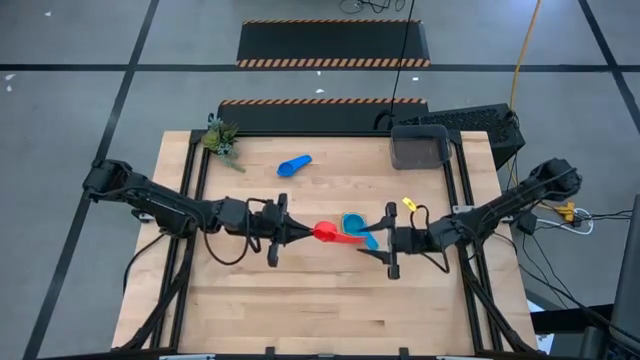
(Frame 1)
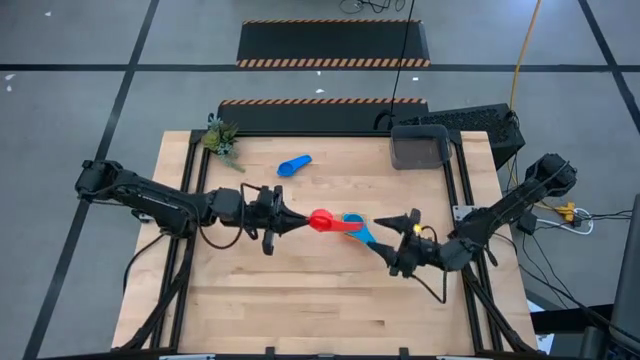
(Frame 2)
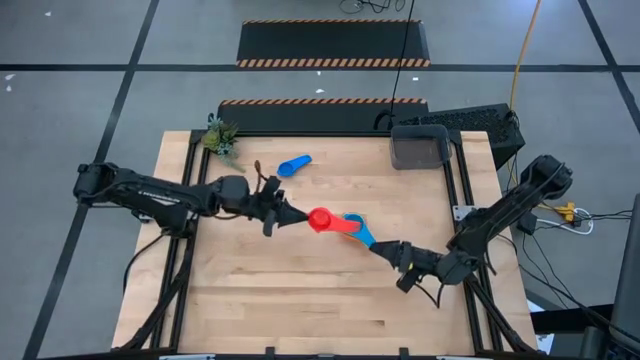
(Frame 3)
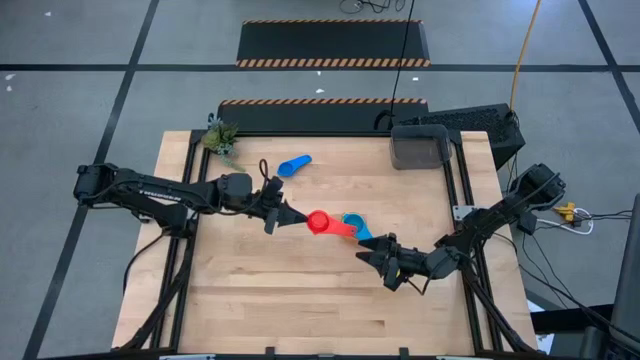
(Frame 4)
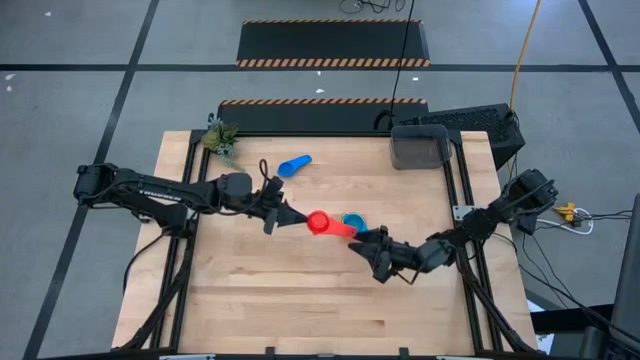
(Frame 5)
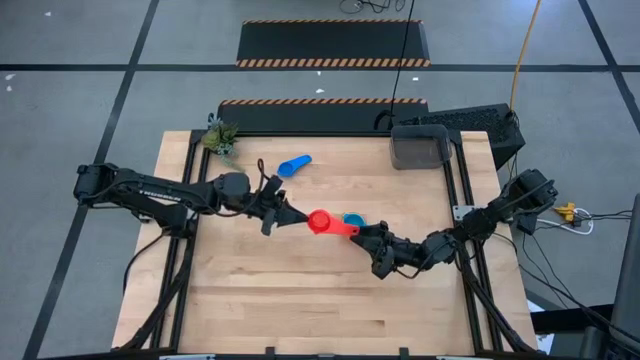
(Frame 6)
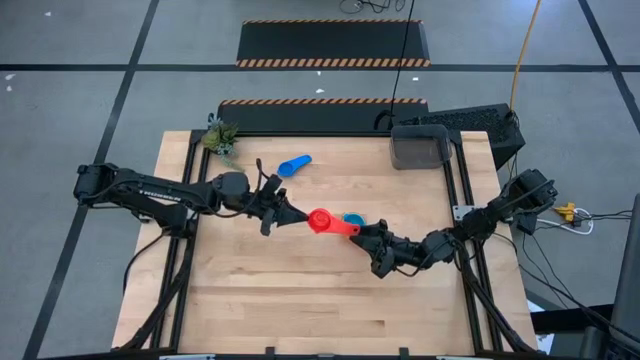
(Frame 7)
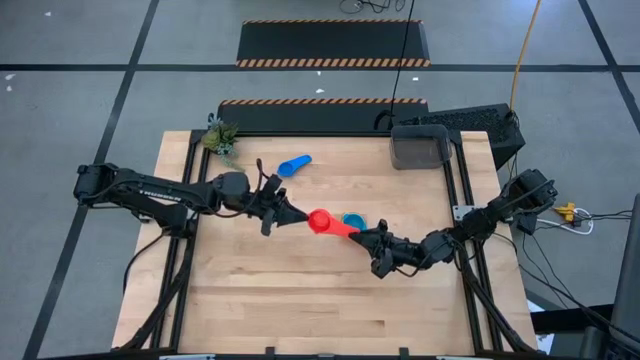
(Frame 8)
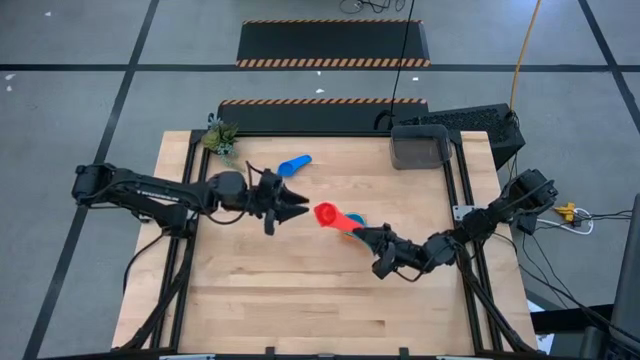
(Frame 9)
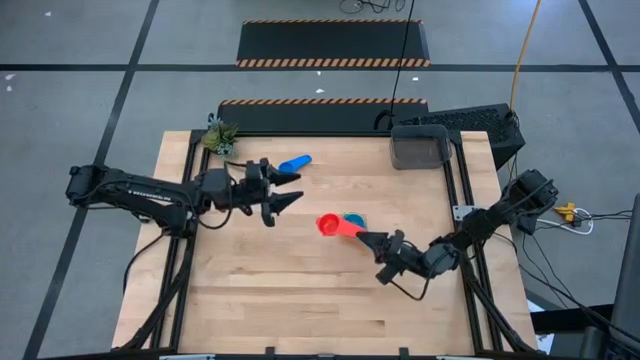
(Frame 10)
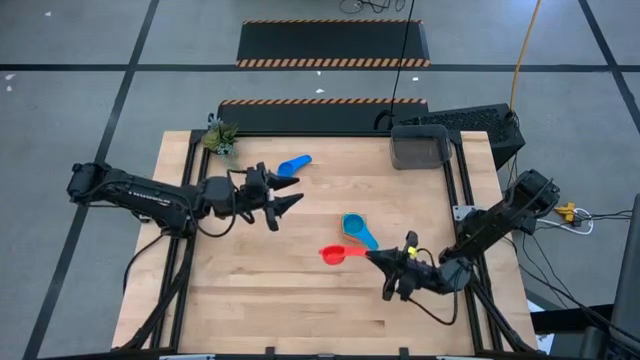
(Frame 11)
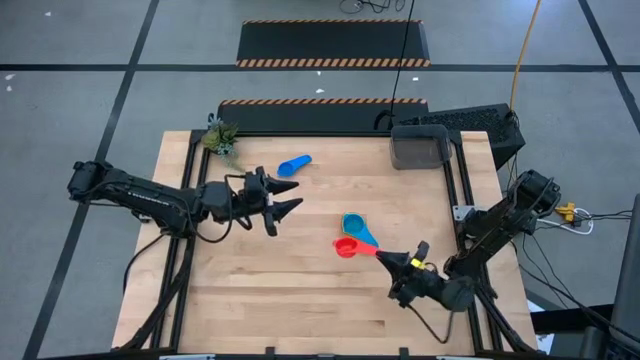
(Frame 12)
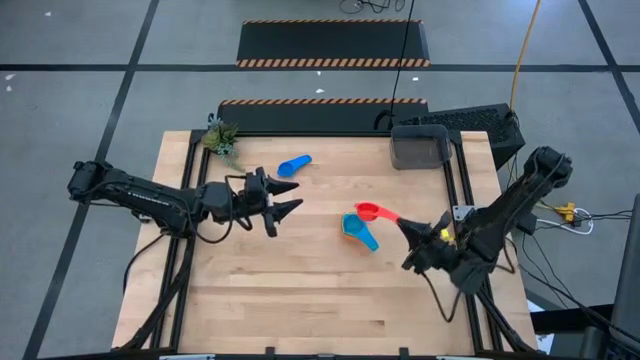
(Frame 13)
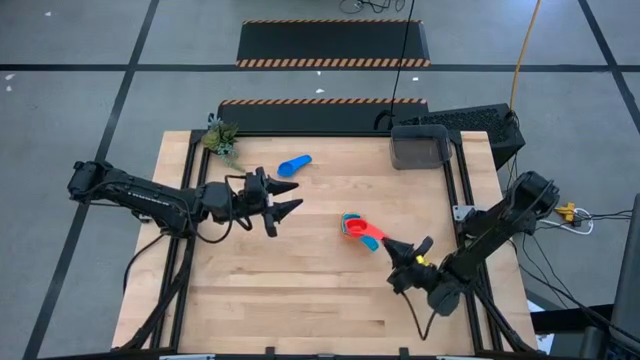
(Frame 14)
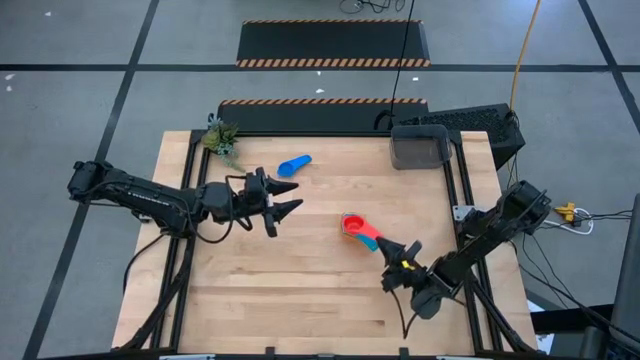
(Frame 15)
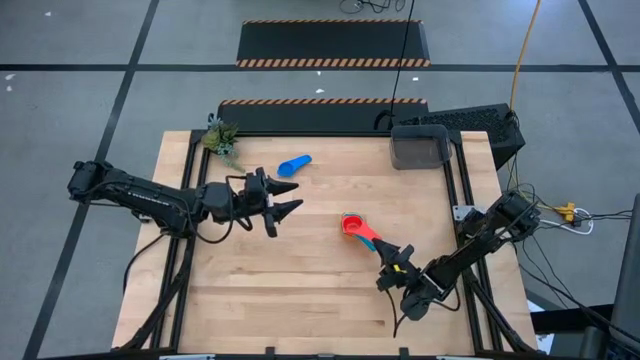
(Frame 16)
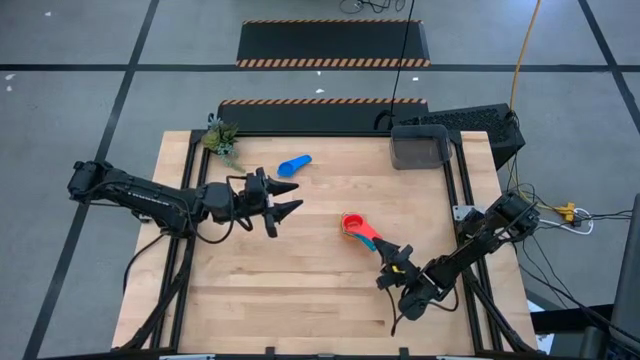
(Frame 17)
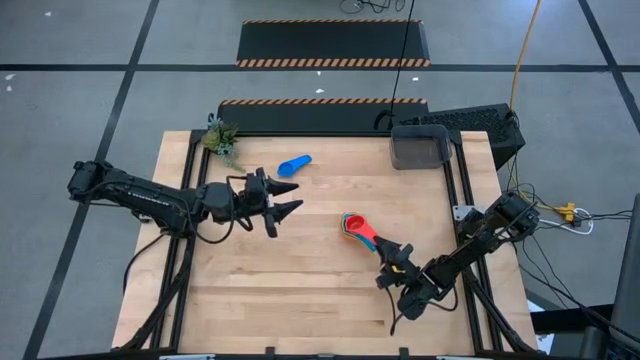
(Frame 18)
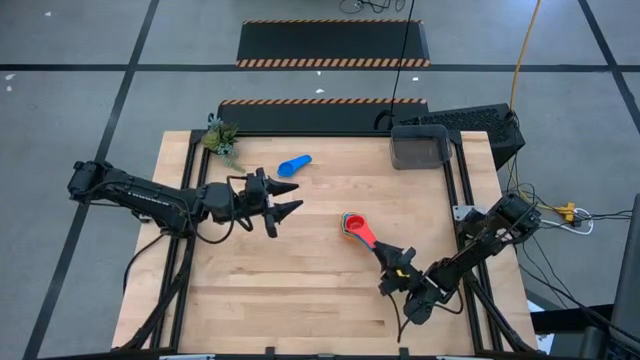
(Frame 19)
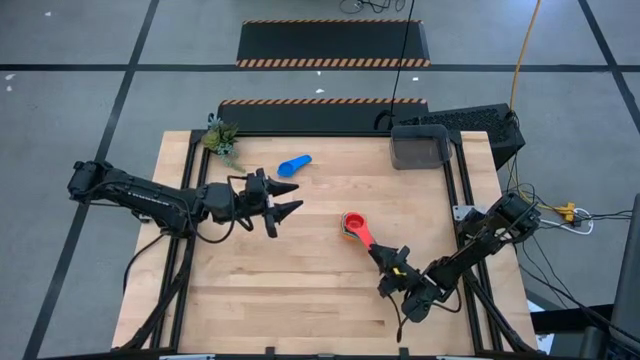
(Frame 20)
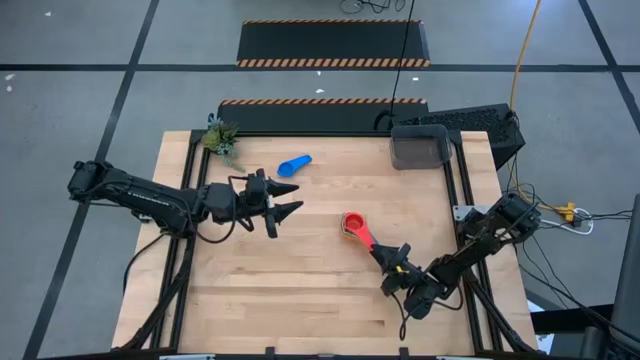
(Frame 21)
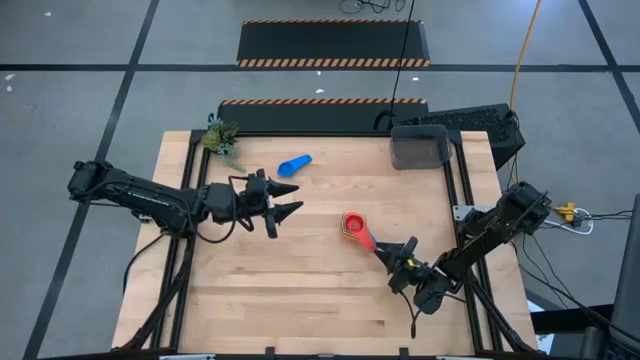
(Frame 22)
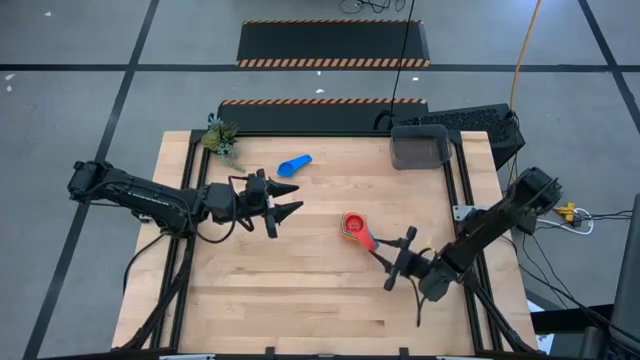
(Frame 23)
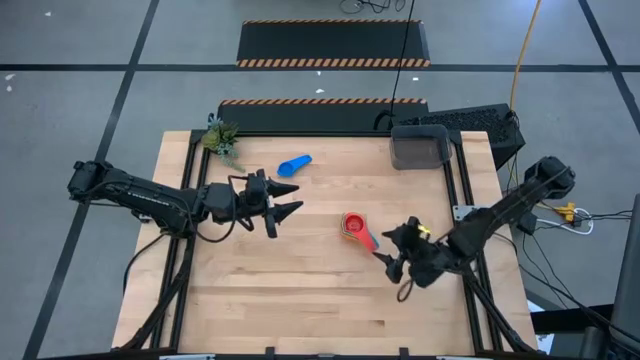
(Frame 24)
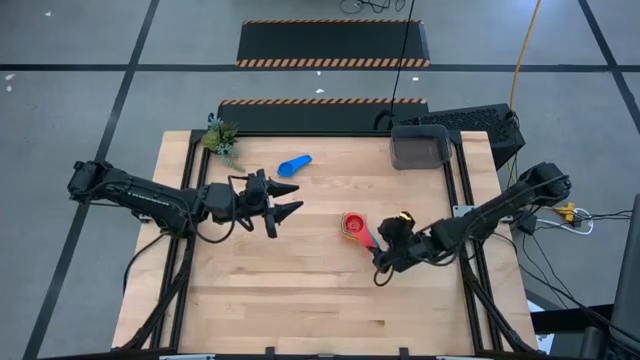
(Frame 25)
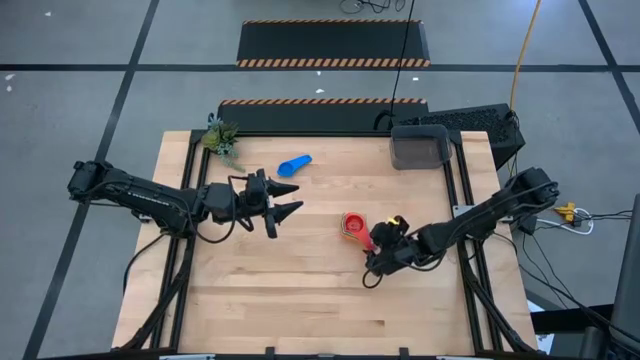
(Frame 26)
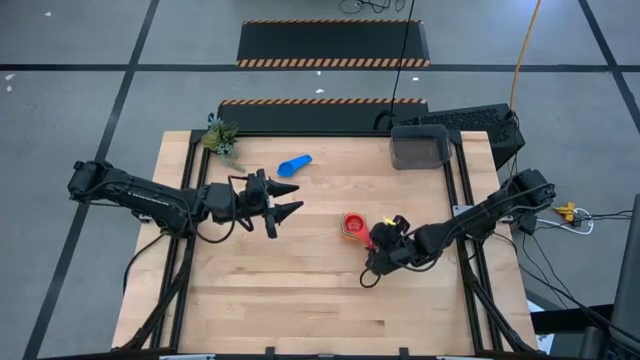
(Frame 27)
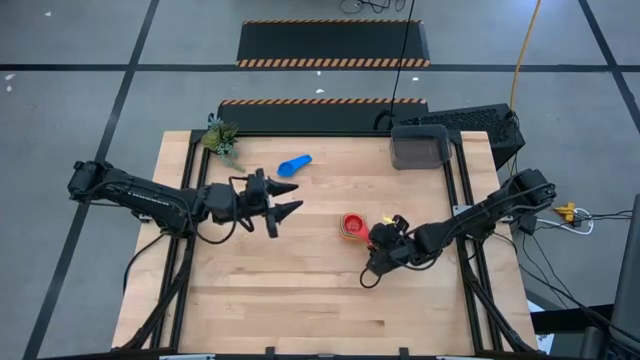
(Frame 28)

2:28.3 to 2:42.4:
Task: Nest measuring cups in basket
Stack the light red measuring cup on top of the light blue measuring cup

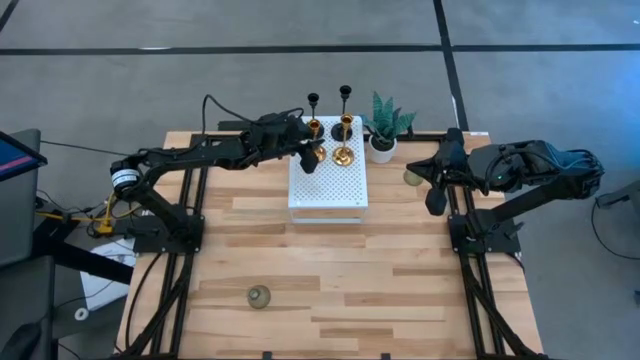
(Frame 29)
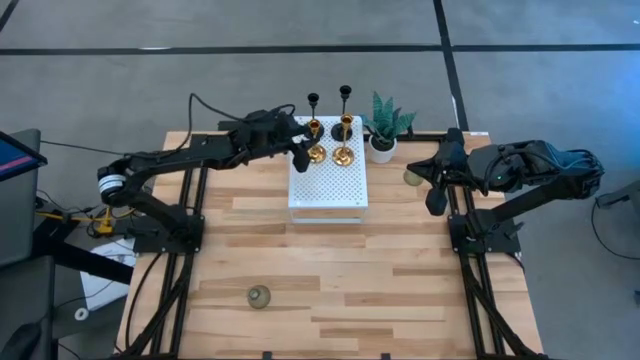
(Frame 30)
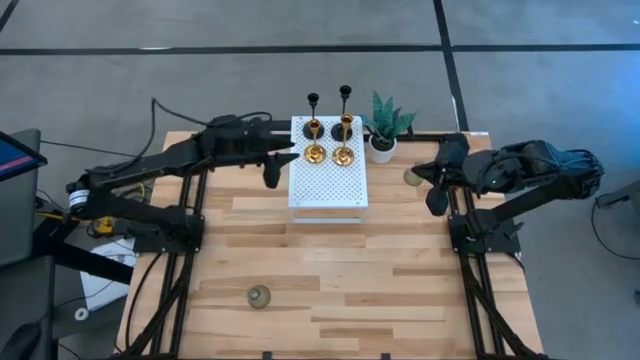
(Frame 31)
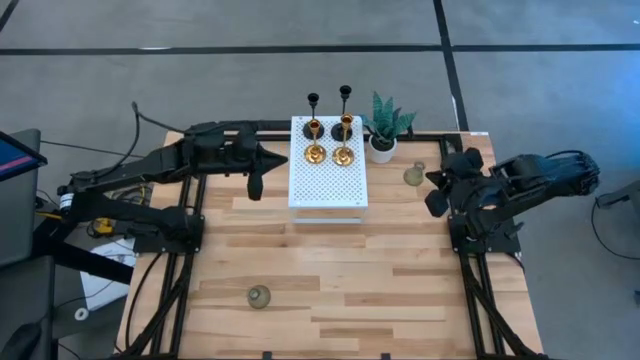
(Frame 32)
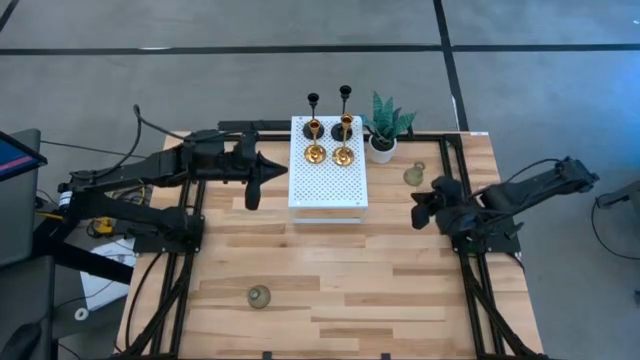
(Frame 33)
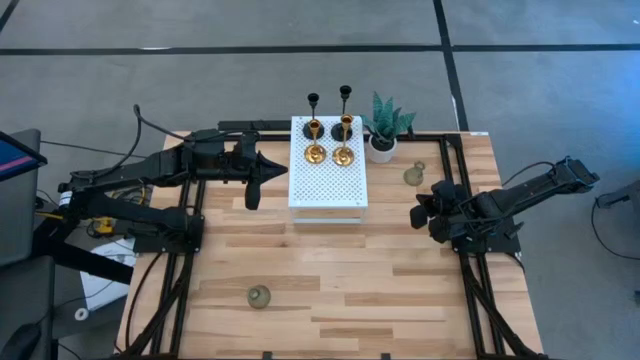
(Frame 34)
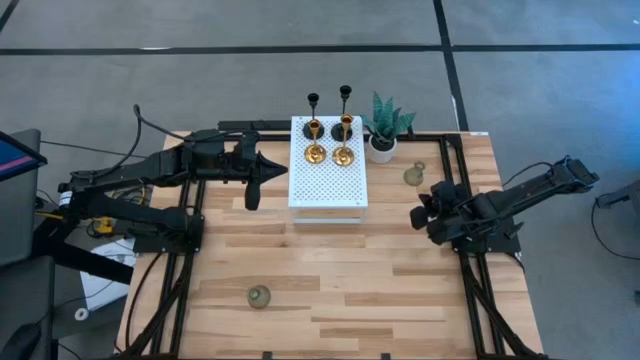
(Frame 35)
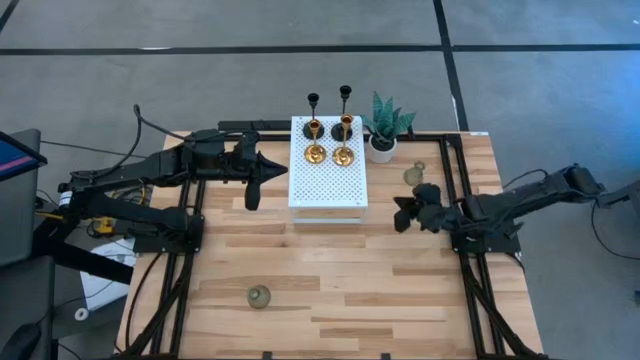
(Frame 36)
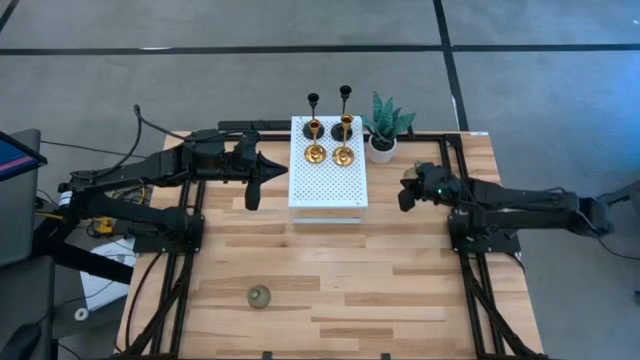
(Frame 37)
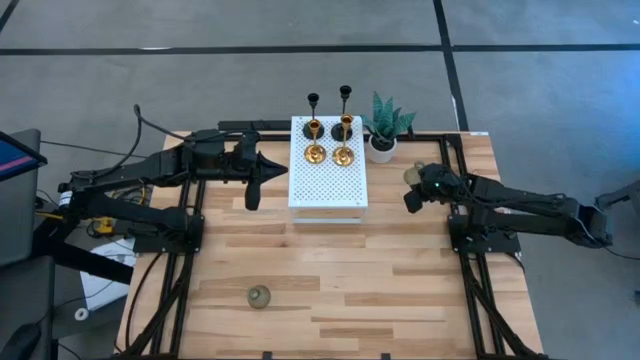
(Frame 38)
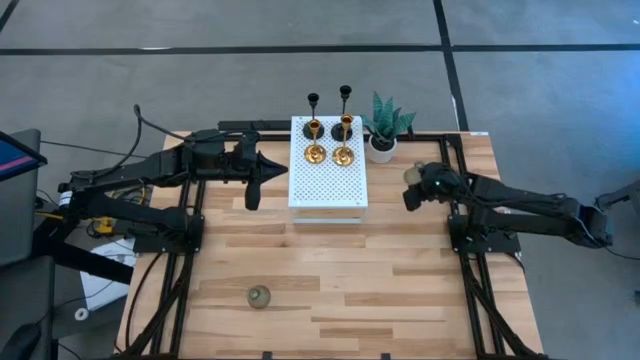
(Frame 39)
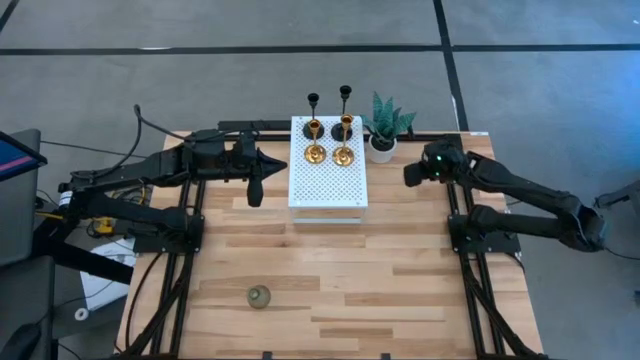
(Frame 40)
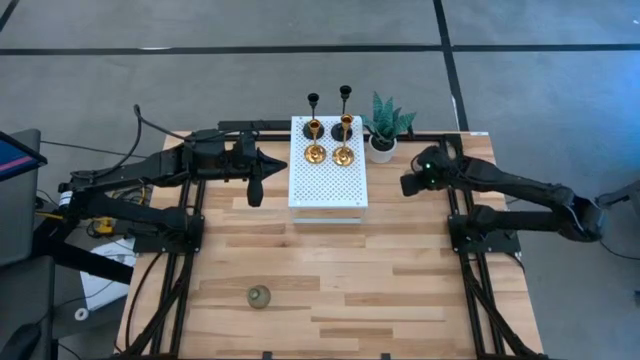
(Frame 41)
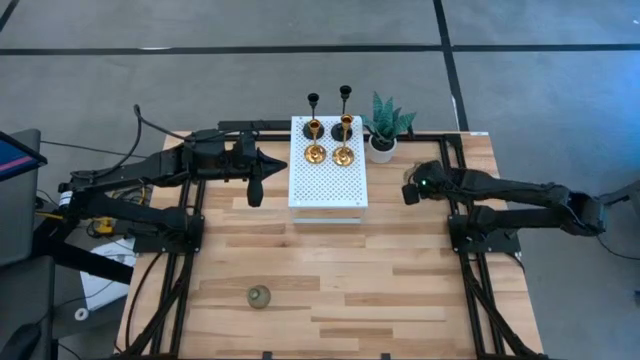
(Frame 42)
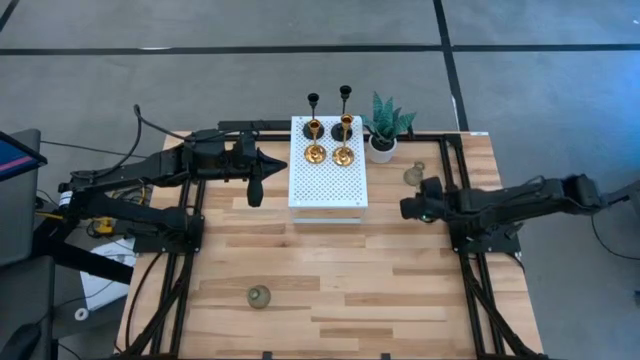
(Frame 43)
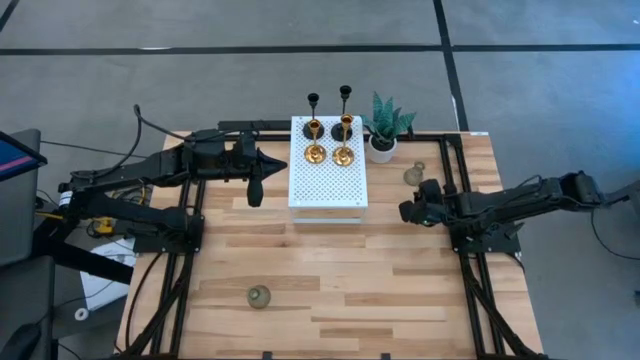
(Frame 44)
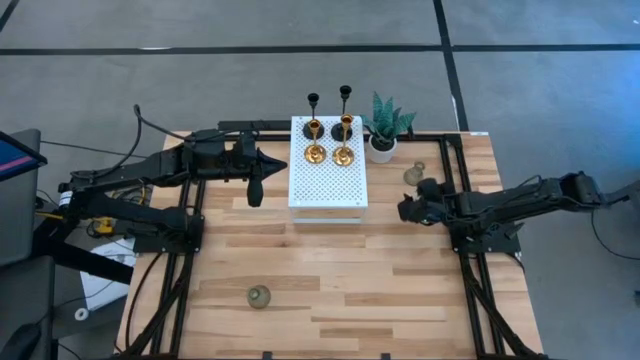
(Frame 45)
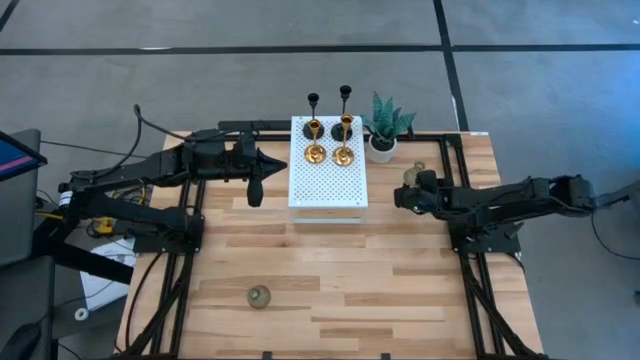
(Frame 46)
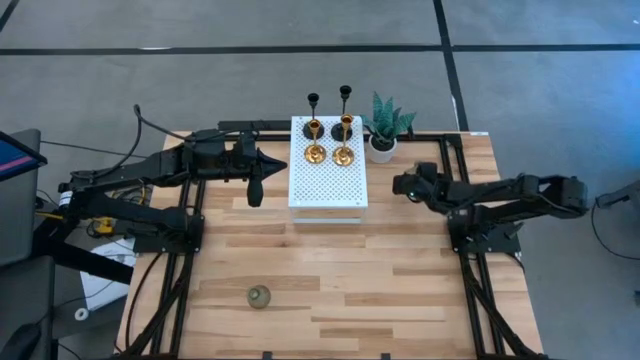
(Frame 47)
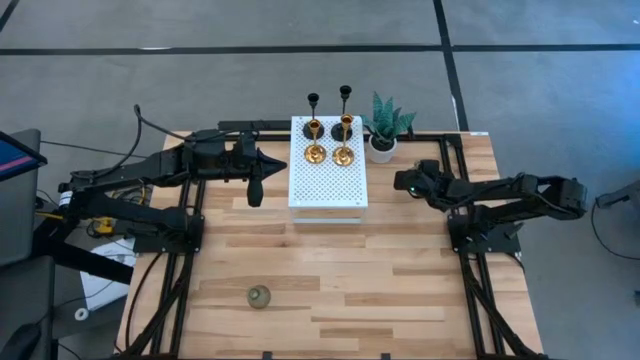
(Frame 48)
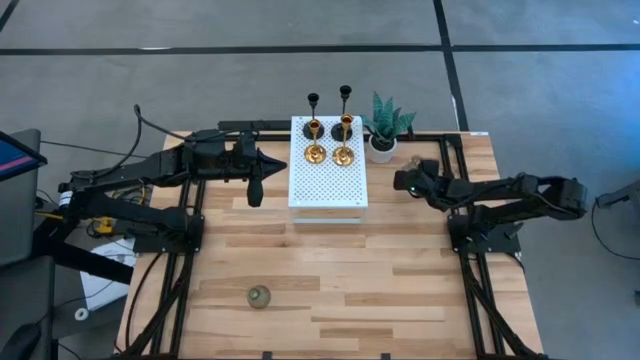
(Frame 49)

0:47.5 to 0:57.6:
Task: Pick & Place candle stick holders
Put the top green glass candle holder on the shelf
